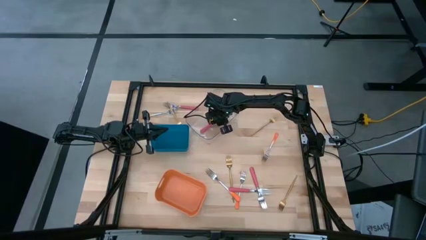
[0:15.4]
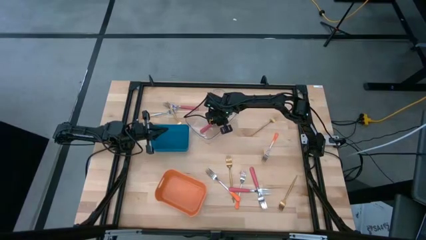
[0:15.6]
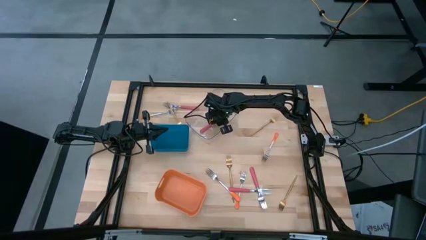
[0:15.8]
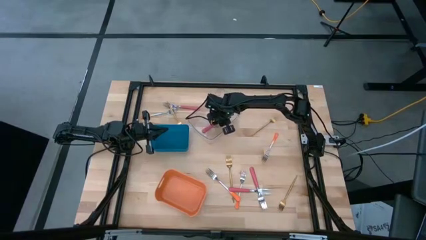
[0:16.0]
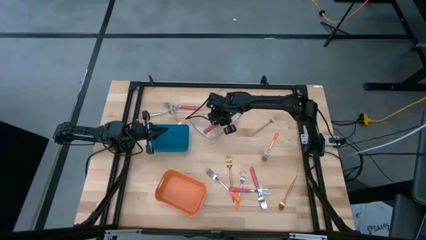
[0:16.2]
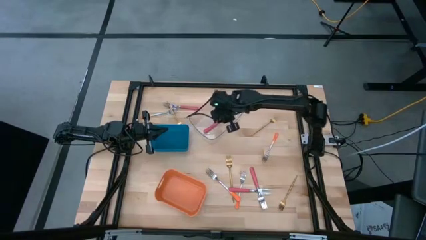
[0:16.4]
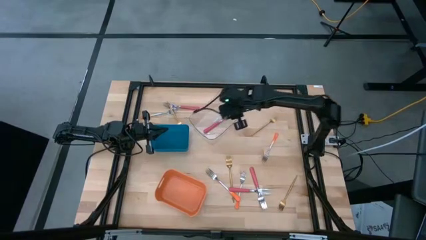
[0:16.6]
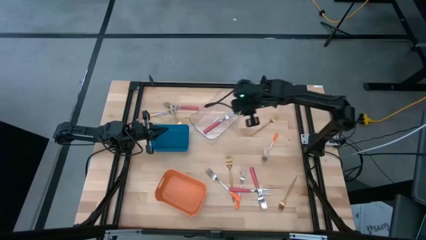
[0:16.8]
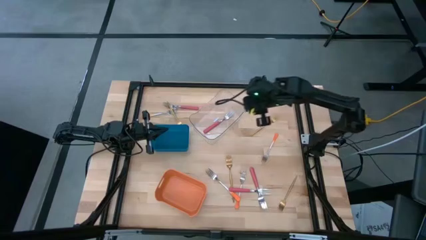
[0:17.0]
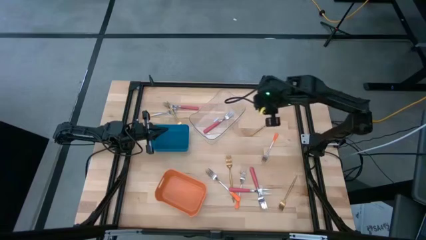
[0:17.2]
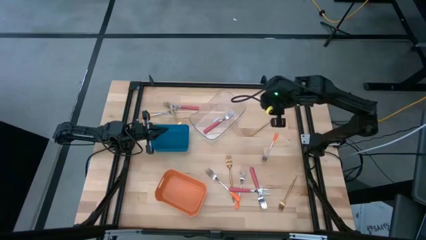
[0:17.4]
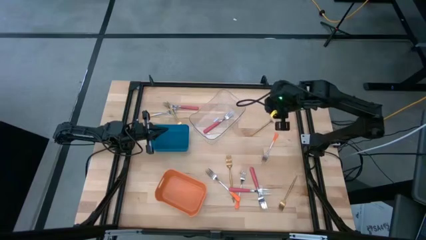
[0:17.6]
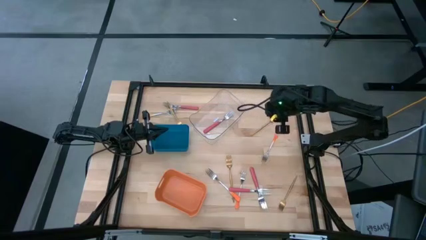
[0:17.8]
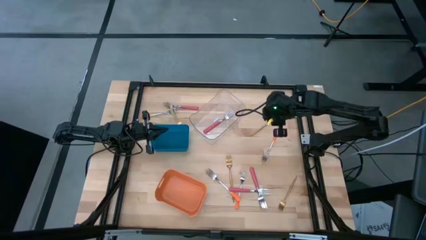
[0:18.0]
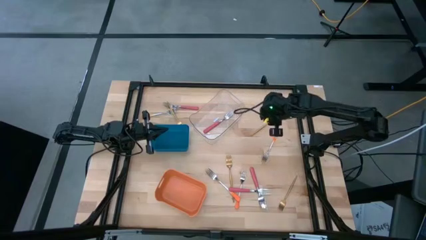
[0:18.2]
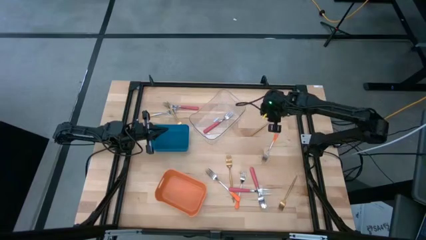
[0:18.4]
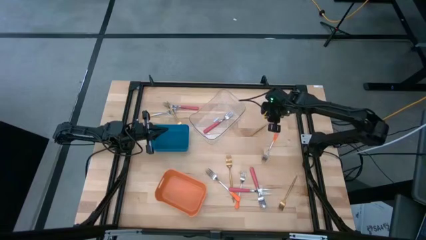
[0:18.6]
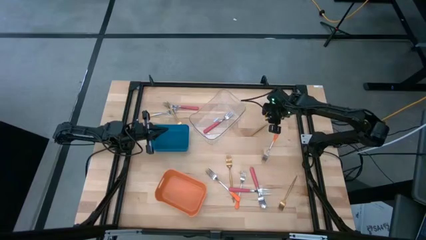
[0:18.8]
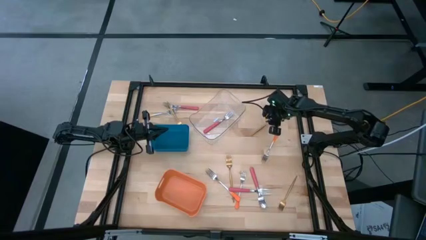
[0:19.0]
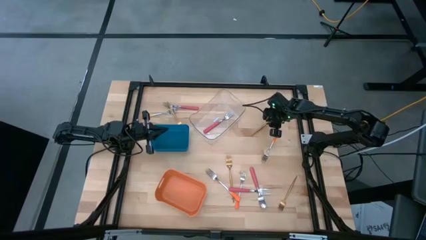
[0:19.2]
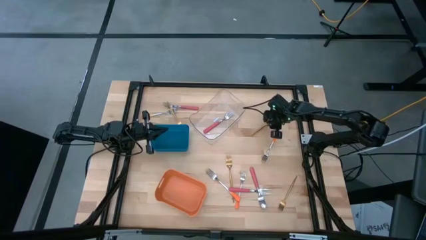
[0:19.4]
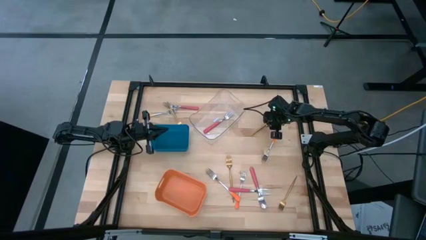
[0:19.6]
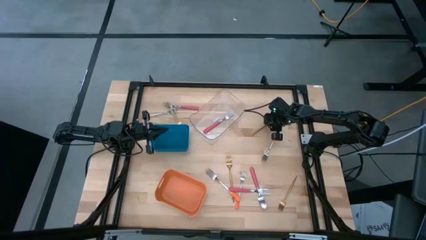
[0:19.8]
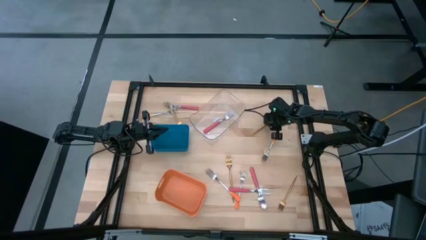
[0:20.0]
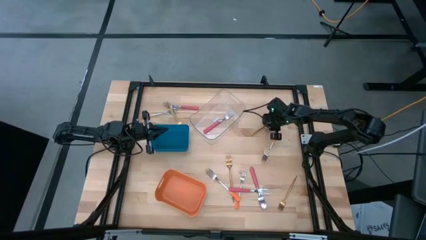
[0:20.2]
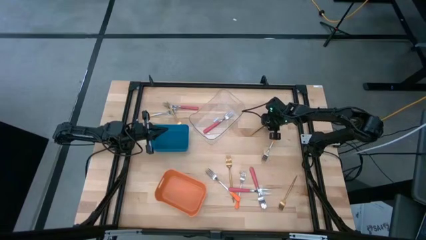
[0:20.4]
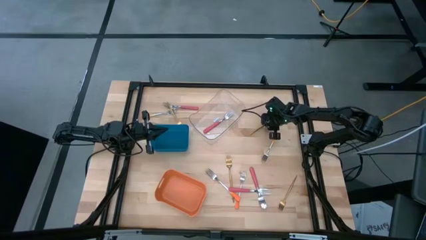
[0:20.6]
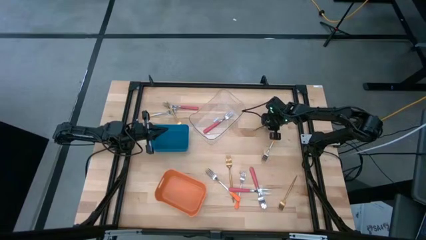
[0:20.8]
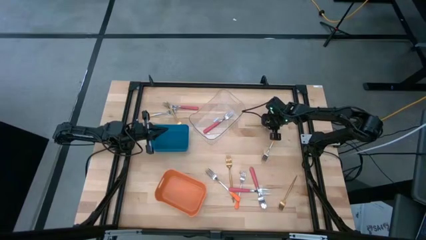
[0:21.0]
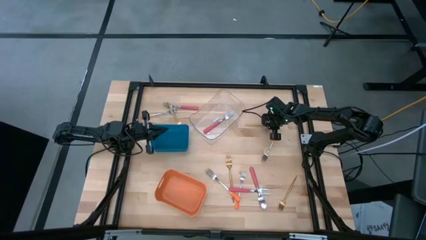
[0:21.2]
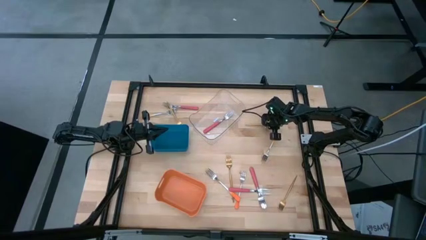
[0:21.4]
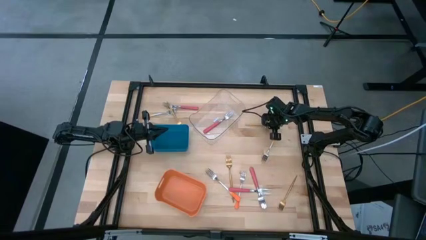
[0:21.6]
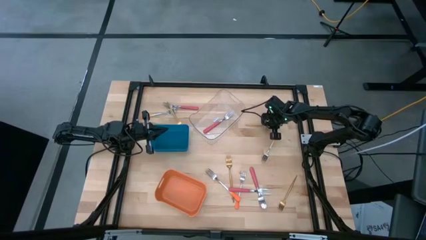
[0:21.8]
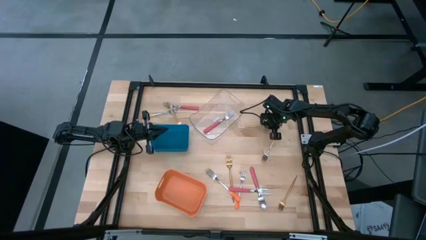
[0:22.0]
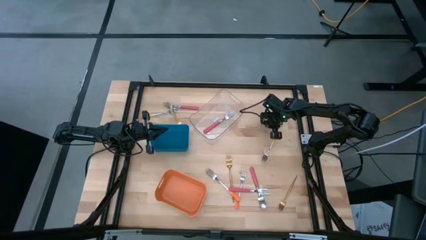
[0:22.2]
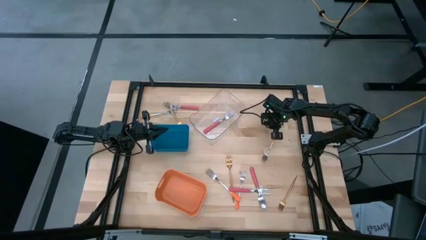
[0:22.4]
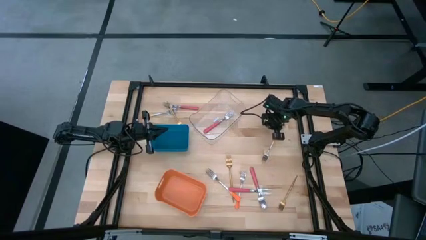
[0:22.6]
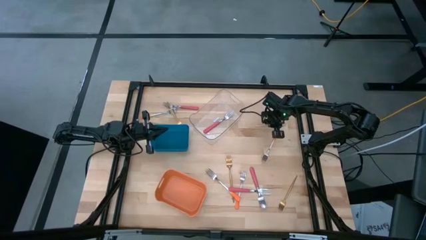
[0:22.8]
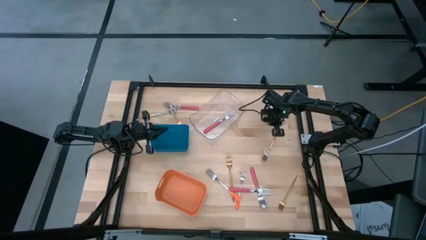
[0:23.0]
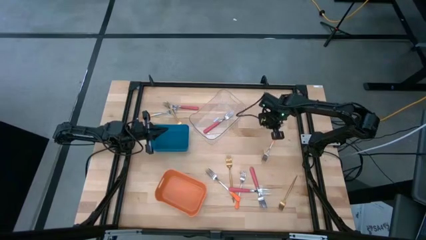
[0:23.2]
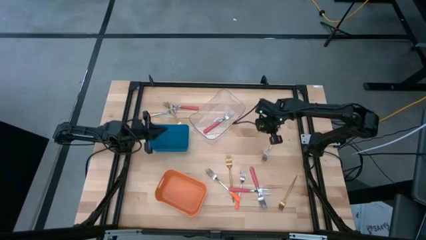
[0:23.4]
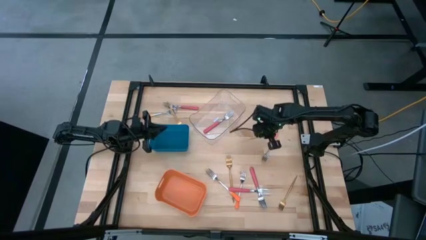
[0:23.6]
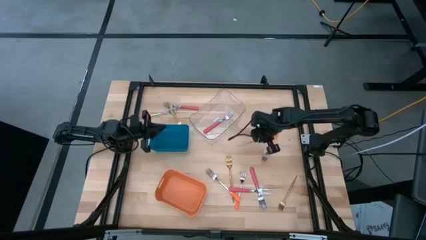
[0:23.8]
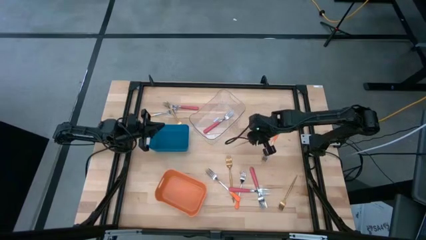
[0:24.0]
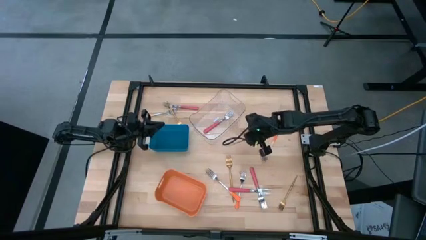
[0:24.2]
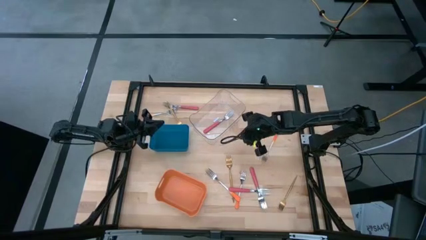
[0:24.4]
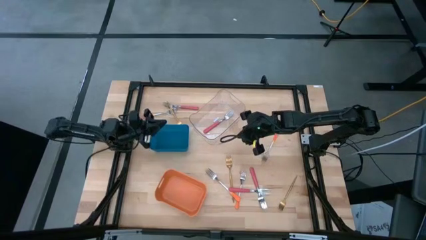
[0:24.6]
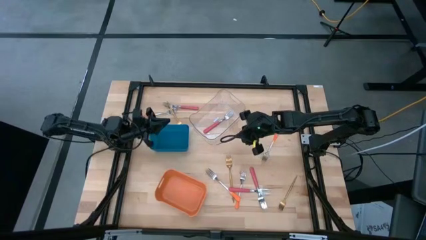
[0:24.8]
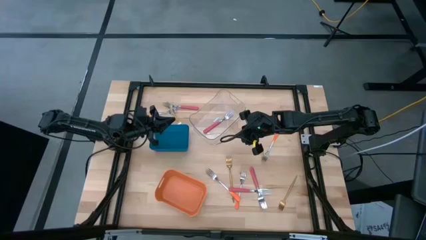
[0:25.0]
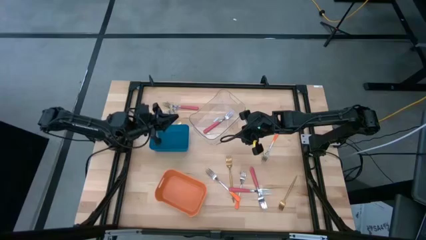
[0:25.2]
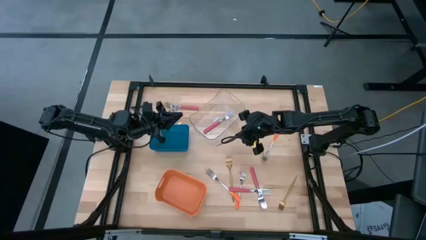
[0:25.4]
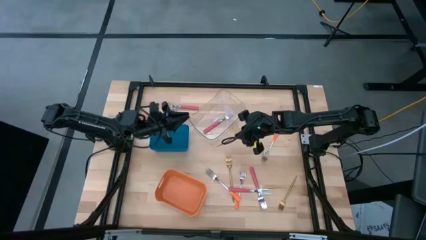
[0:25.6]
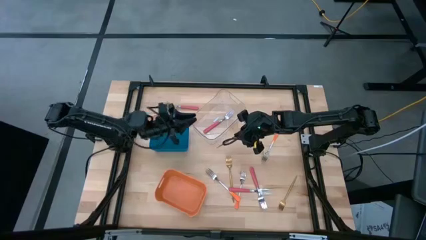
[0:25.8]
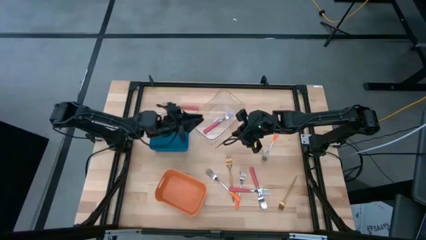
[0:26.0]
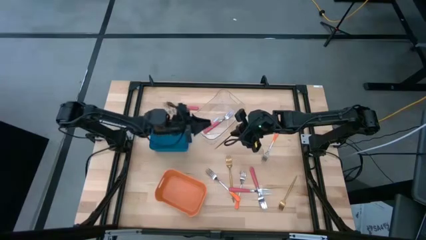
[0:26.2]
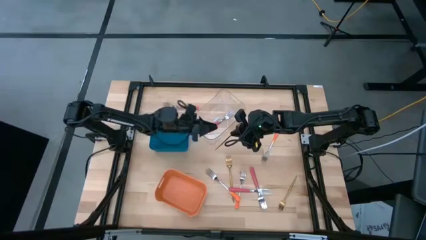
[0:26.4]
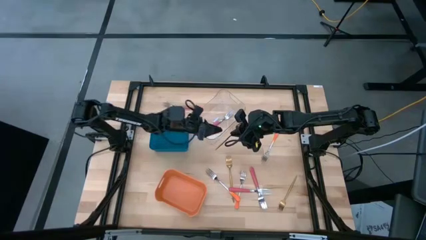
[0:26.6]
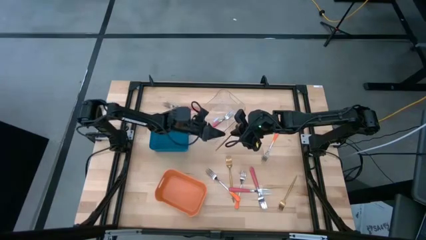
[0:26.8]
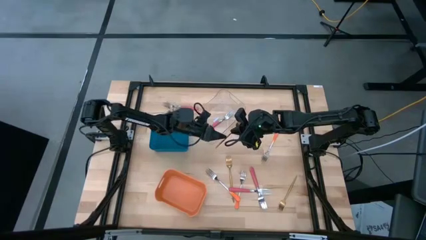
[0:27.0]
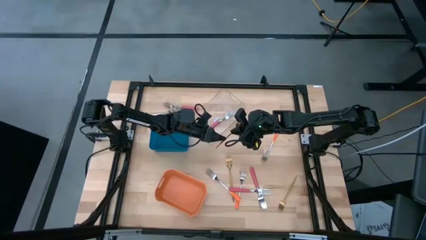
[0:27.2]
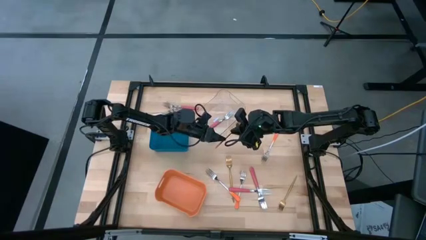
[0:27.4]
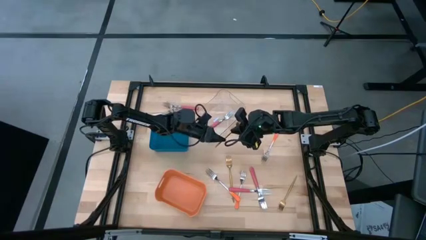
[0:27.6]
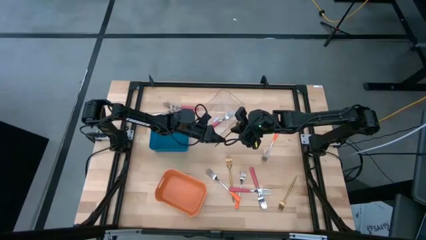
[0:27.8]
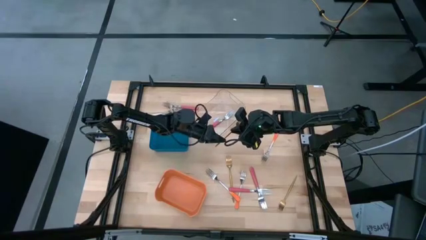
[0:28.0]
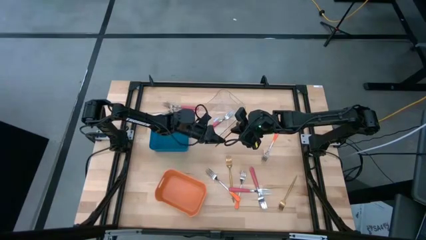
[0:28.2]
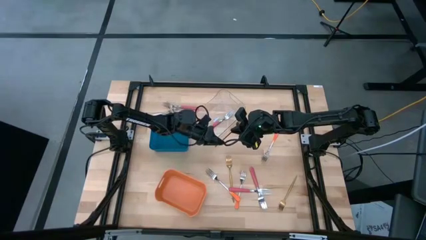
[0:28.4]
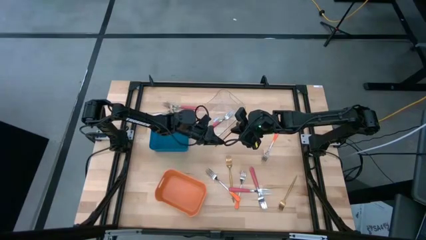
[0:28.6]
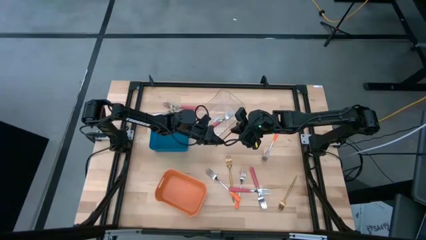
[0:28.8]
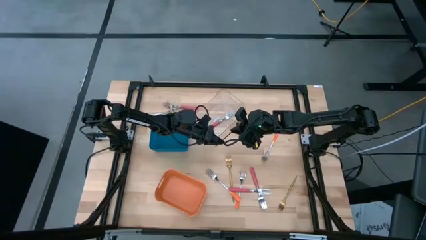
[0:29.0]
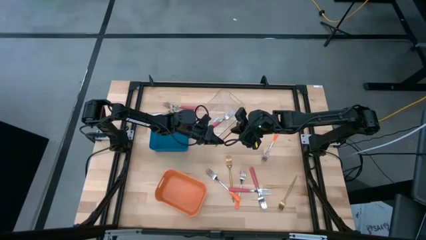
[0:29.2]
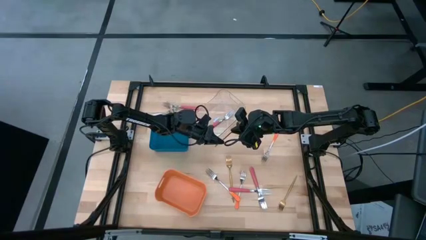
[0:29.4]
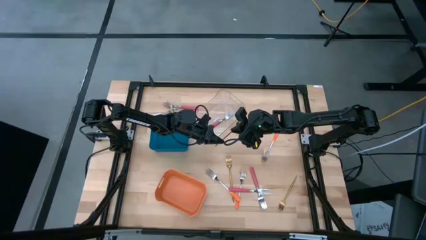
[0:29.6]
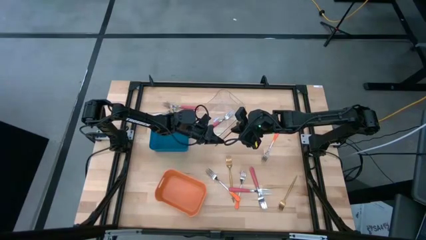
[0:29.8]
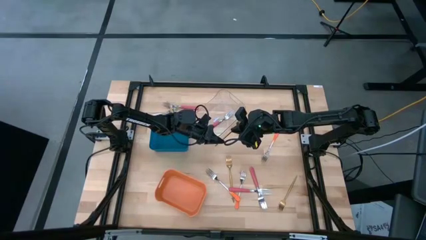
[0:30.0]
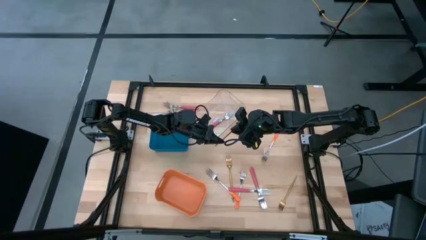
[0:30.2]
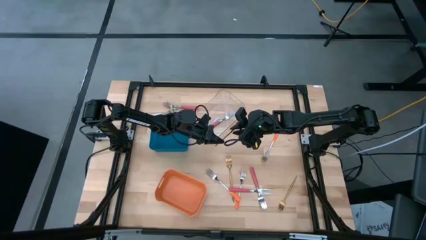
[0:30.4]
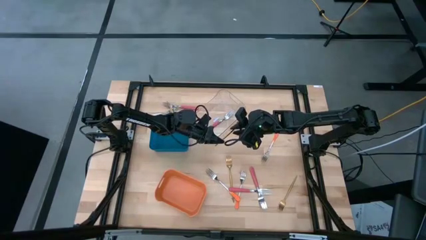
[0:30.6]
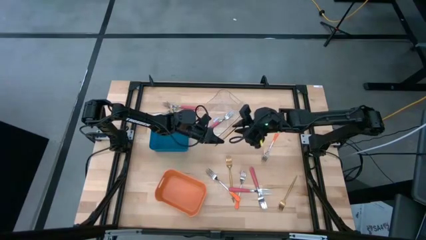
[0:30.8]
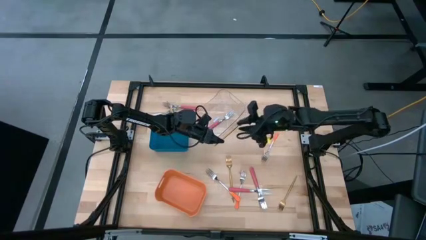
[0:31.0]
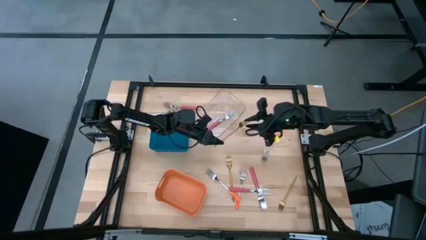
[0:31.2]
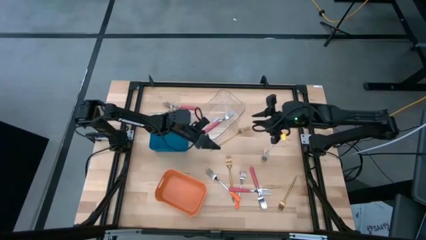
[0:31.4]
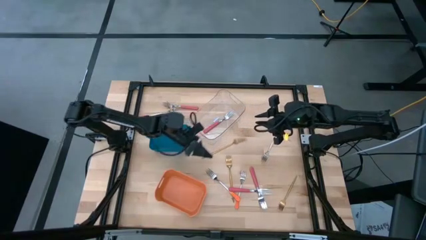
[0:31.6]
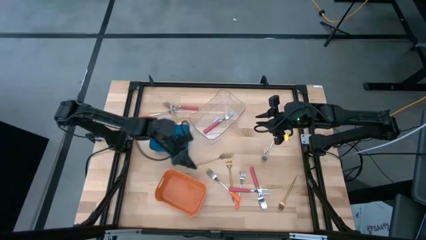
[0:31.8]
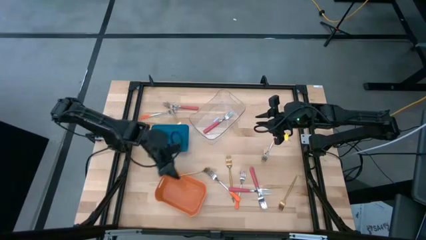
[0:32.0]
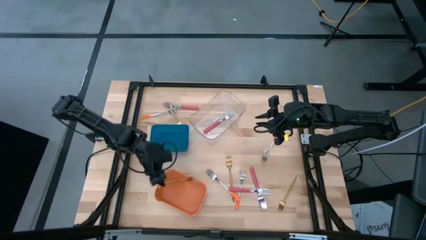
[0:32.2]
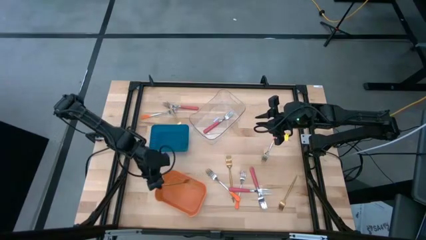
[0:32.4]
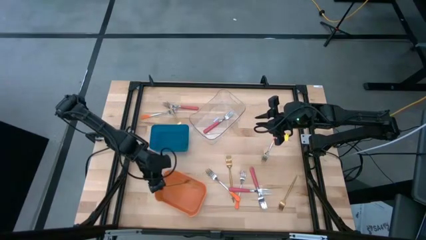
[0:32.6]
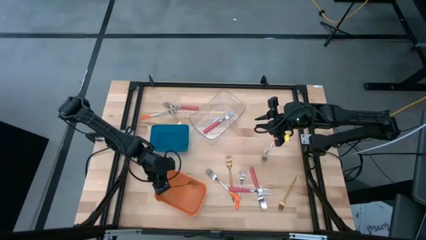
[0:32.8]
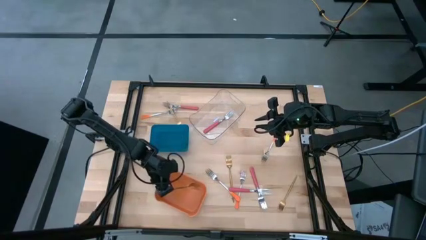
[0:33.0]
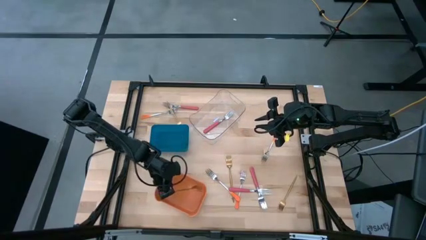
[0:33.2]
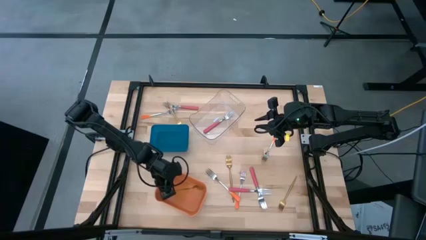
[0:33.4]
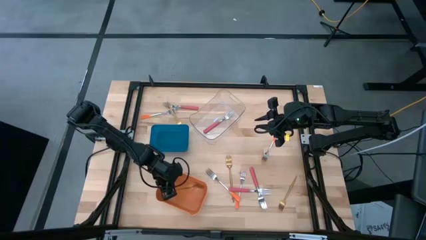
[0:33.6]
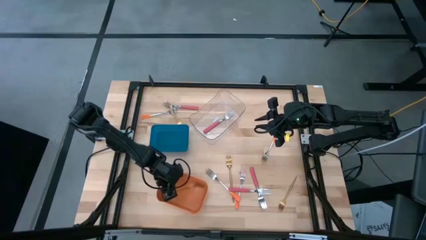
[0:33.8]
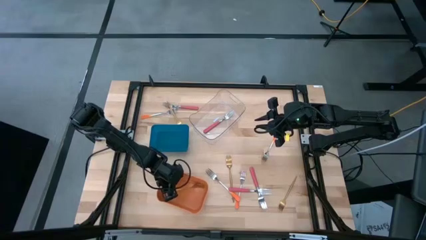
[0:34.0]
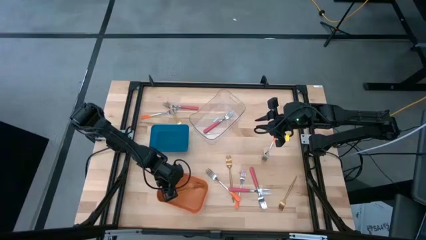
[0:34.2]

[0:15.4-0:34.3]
Task: Sort silverware by color (type)
Put the gold fork into the orange bin
